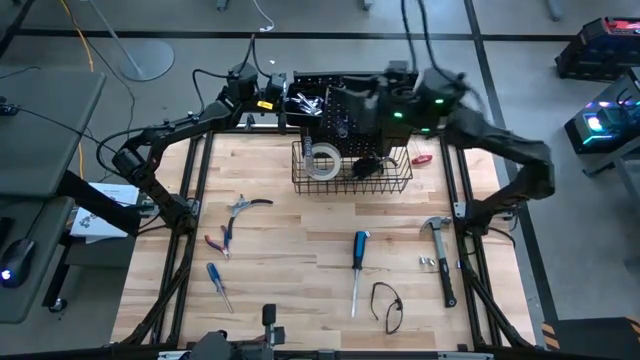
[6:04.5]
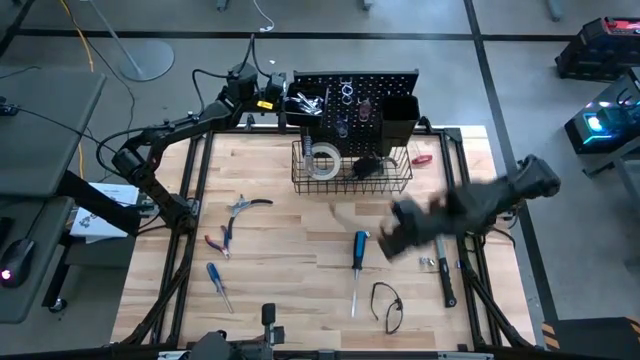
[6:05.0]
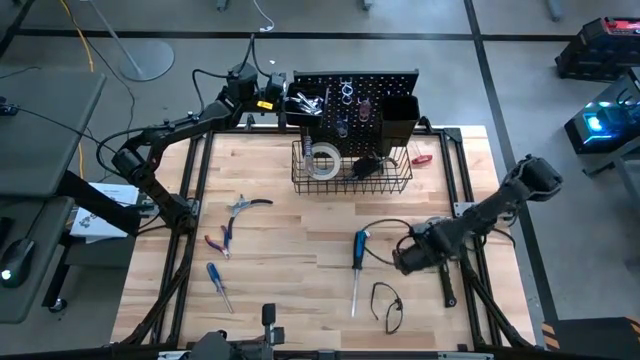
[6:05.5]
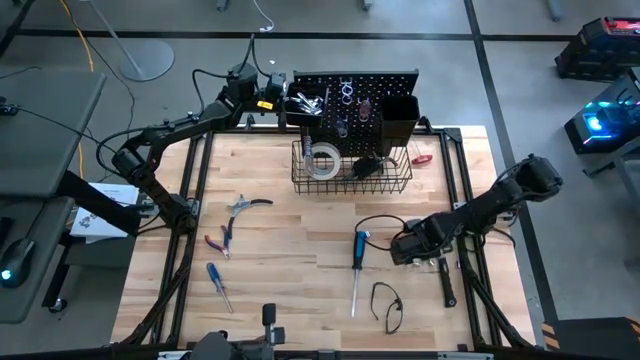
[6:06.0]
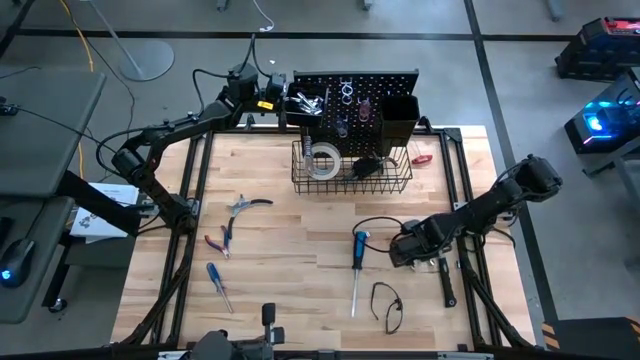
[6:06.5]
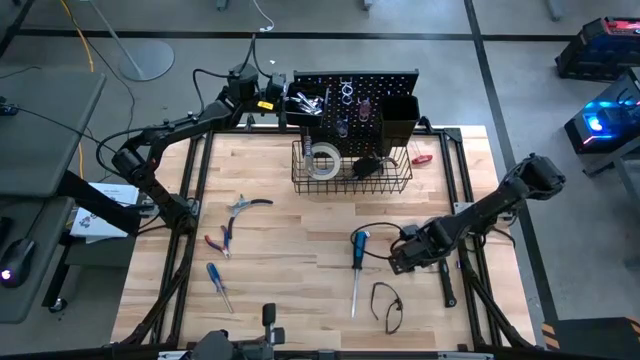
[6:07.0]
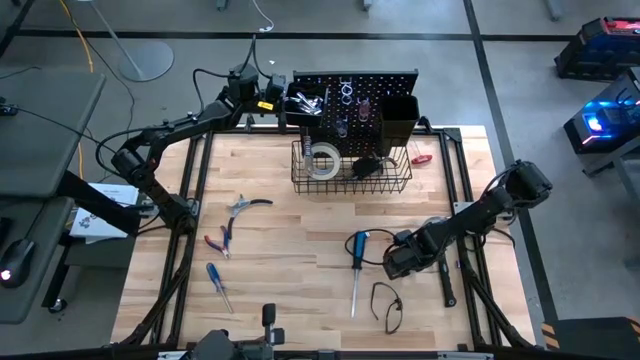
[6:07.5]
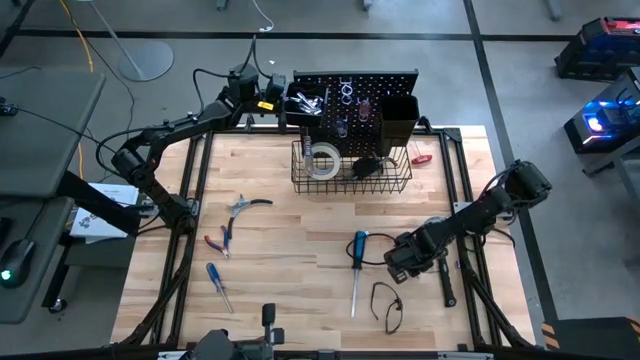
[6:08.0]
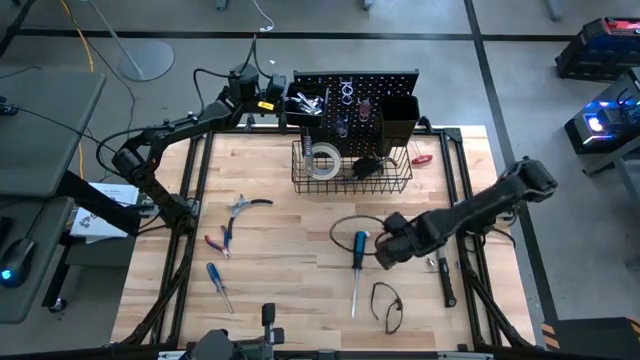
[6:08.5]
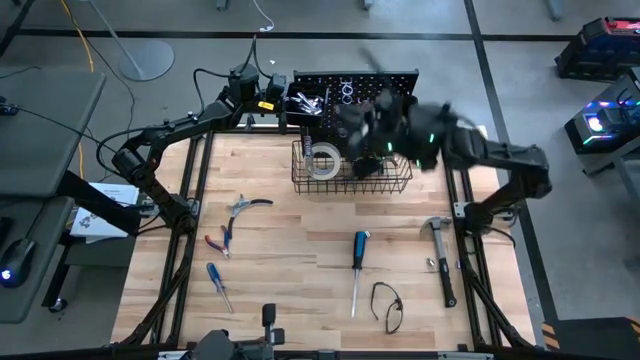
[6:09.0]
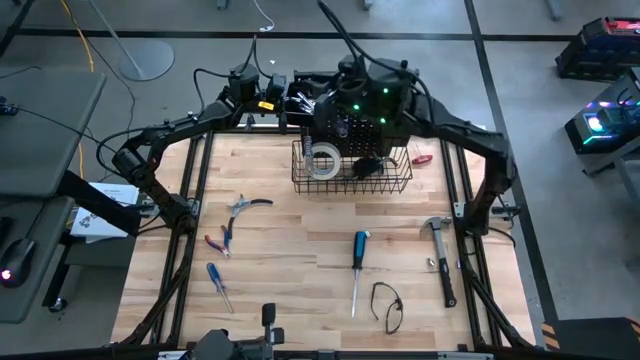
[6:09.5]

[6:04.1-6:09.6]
Task: Hang tools onto peg board
Put the socket in the left black bin on the pegboard

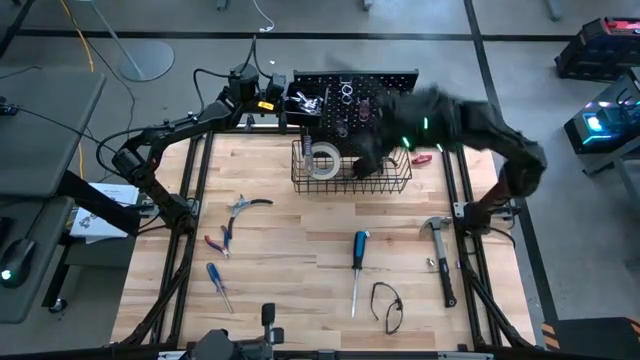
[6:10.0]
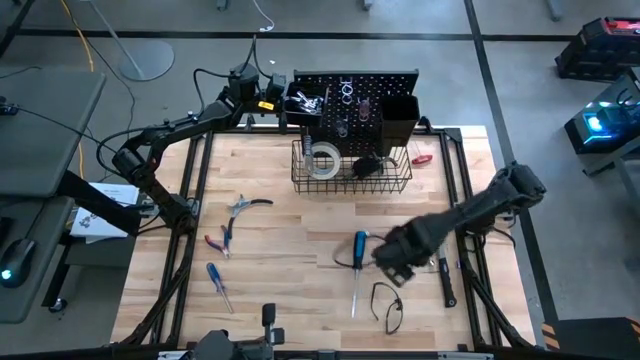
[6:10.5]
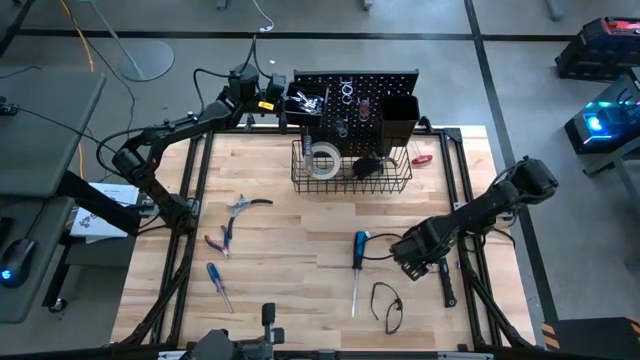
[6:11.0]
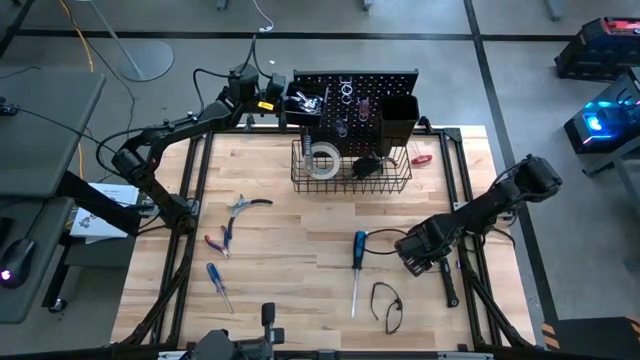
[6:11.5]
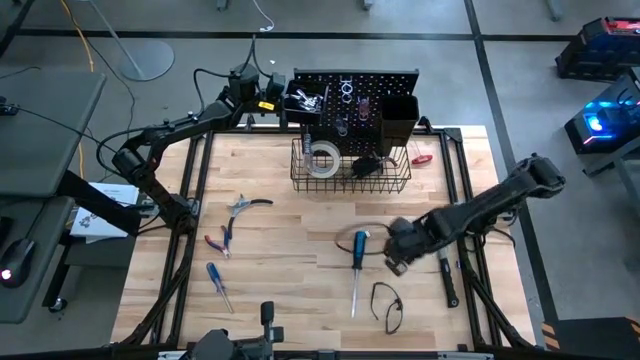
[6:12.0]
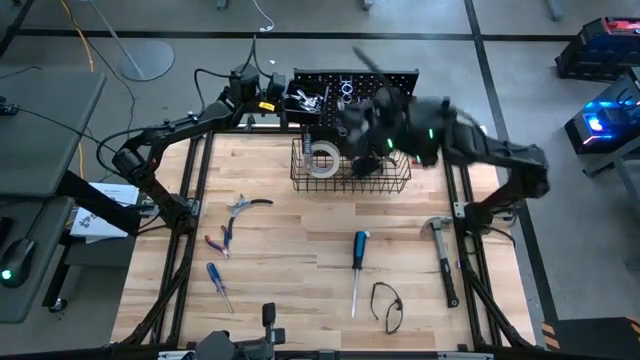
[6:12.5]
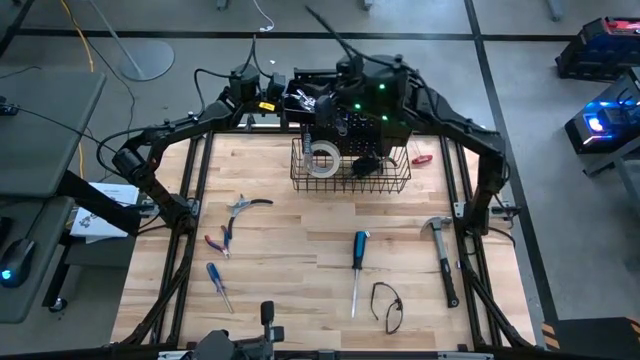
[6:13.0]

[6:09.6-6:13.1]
Put the socket in the left black bin on the pegboard

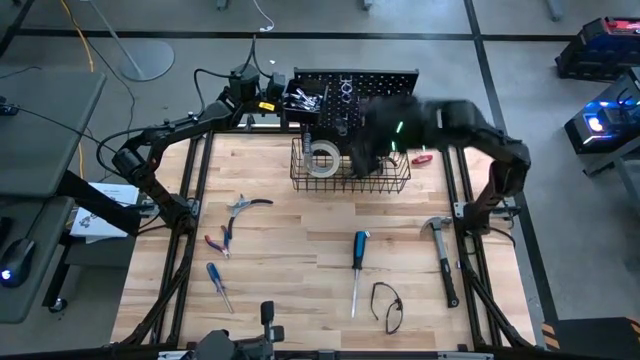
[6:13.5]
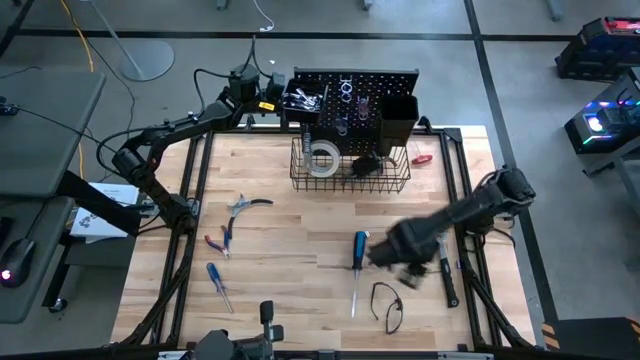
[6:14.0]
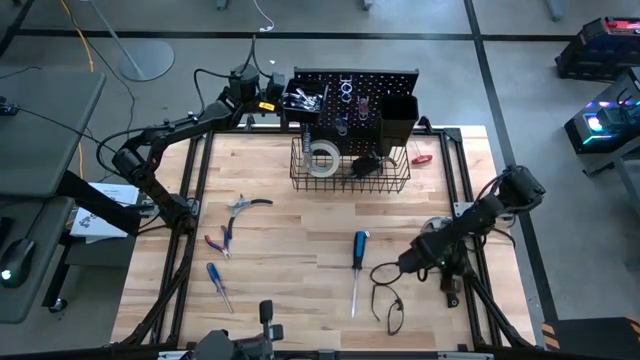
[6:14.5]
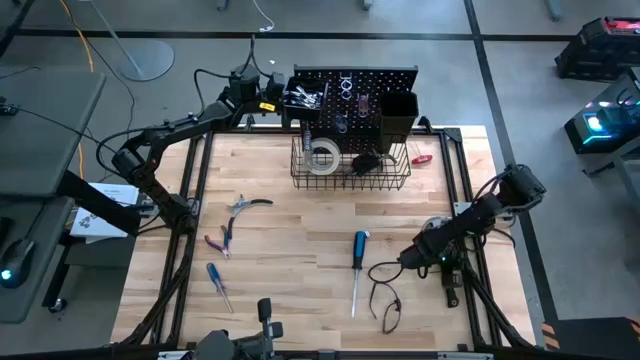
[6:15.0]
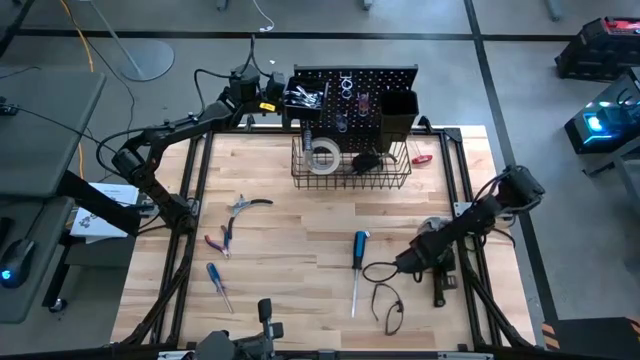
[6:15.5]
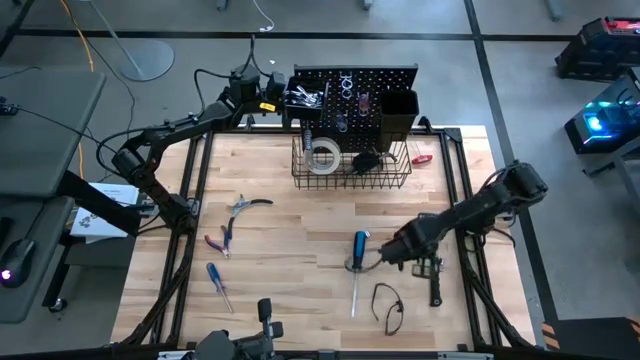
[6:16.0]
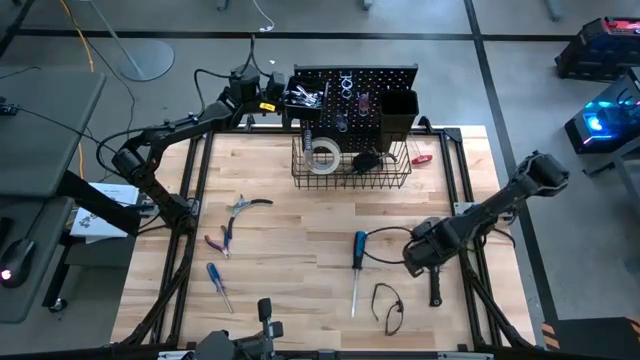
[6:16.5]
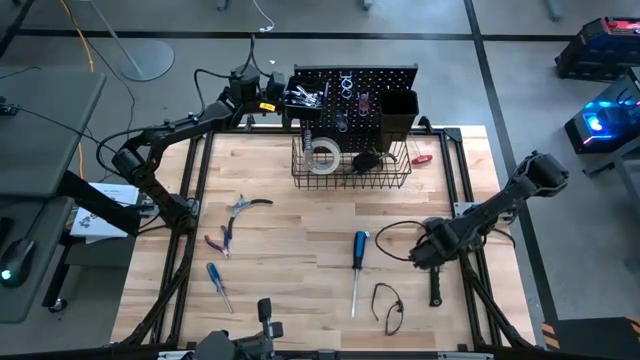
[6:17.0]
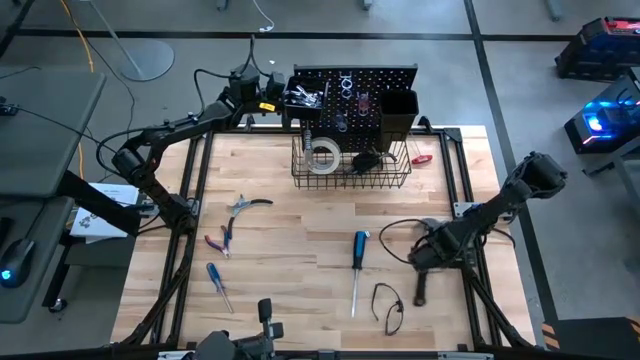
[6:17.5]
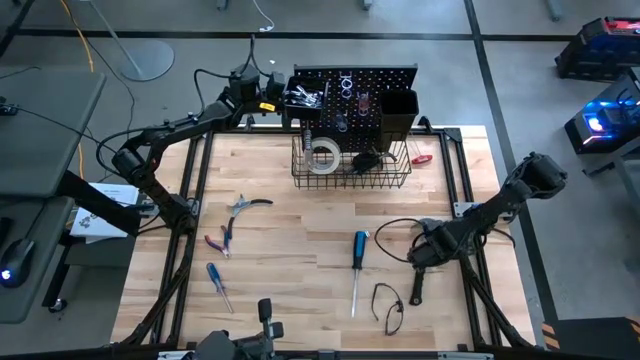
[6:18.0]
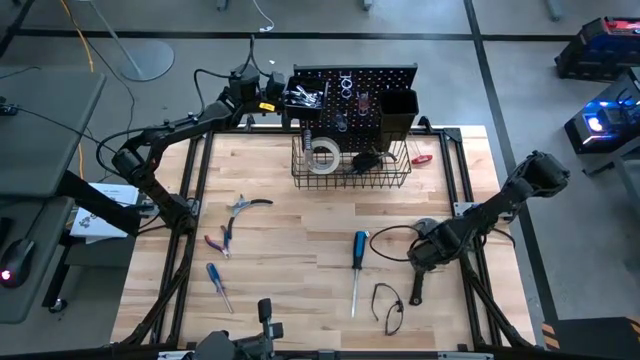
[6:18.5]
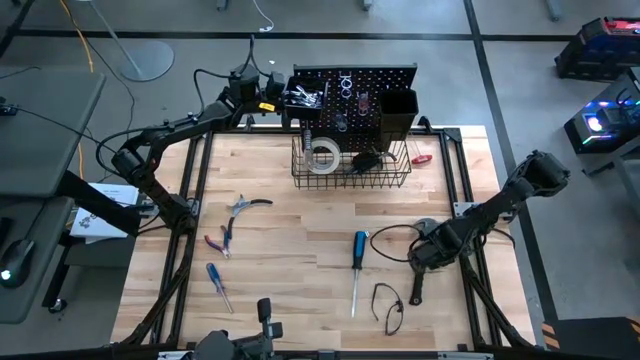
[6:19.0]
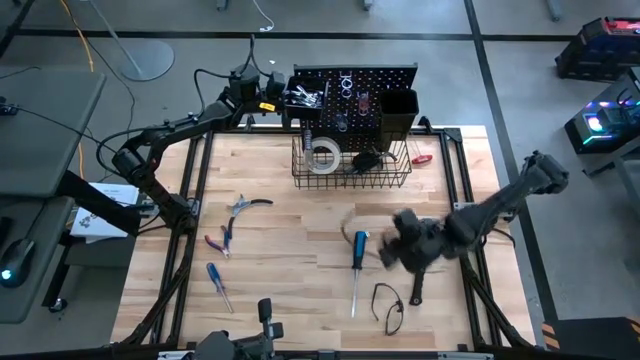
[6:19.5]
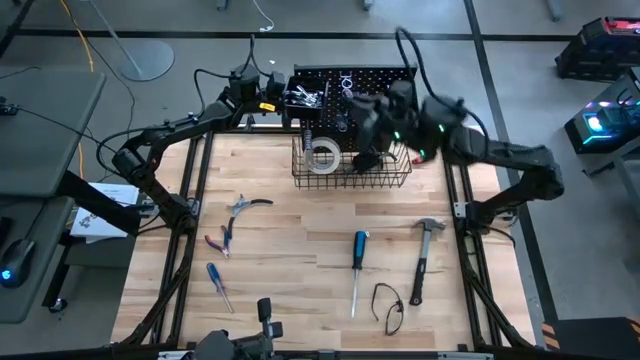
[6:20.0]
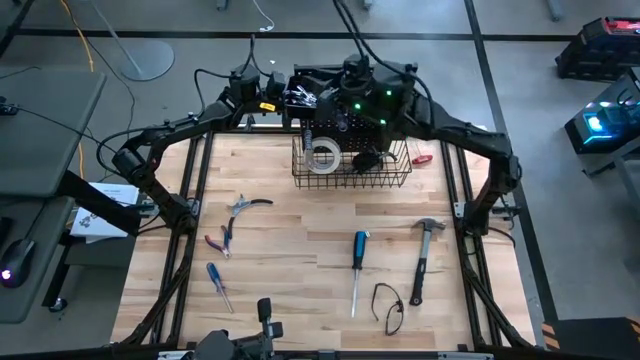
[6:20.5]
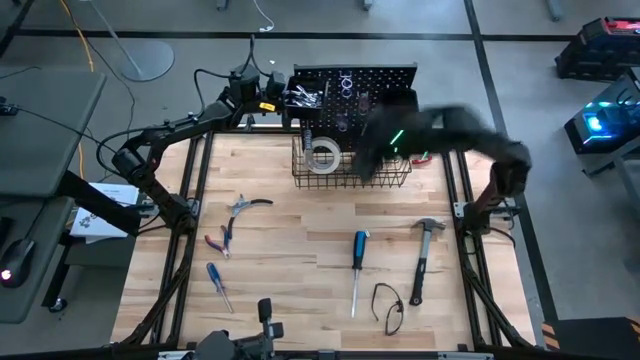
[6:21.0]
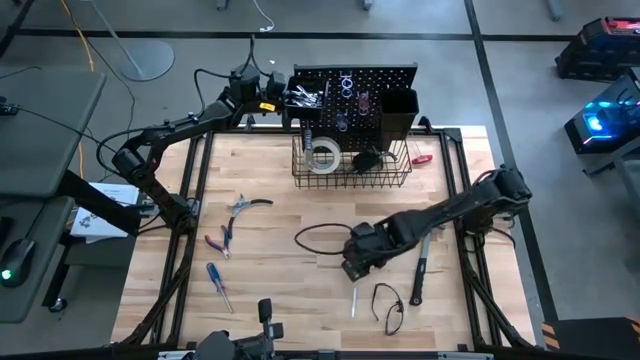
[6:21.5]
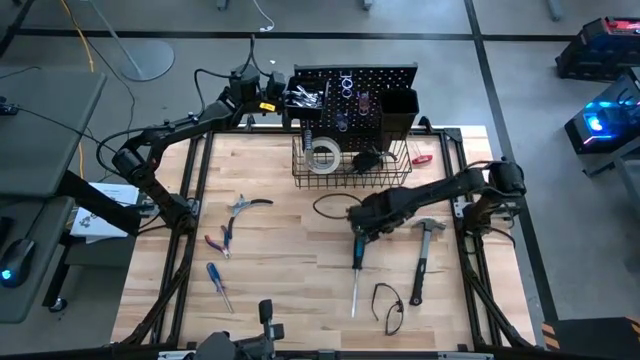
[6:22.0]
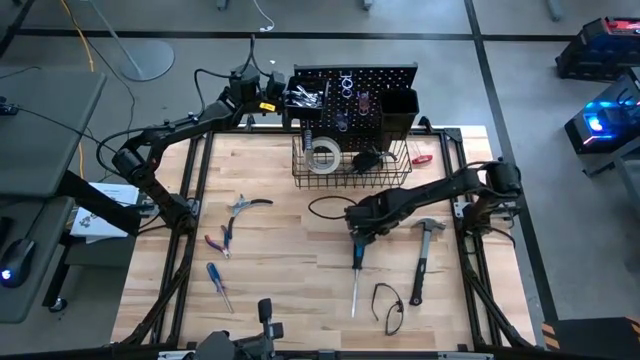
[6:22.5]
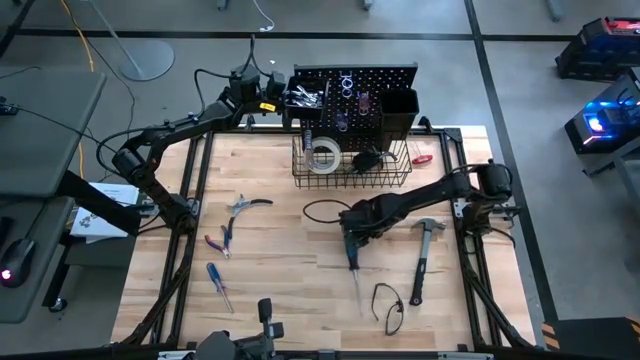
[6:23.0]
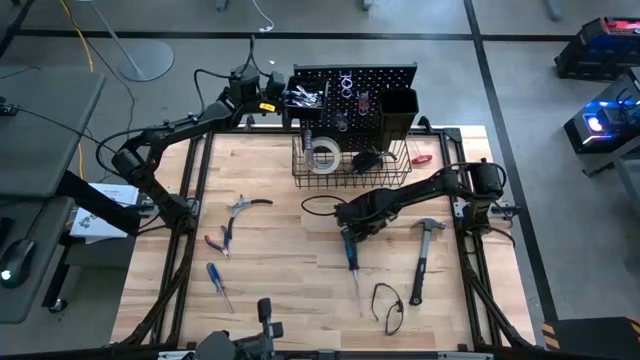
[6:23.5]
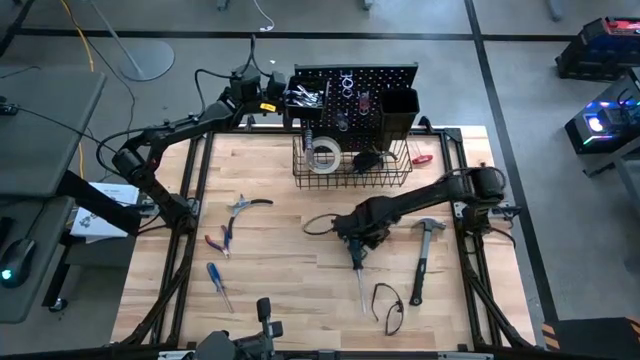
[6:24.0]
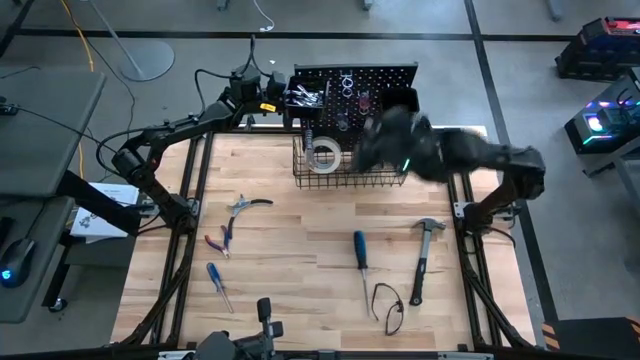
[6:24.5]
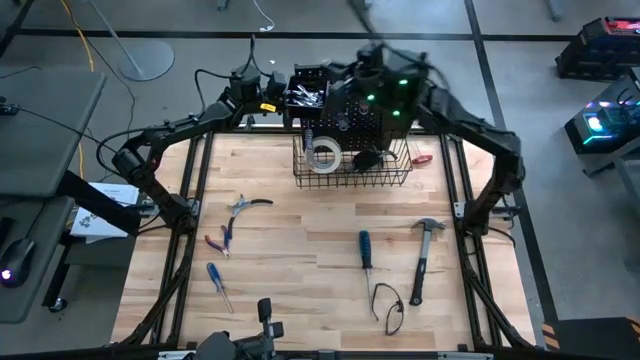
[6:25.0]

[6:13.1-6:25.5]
Put the socket in the left black bin on the pegboard
